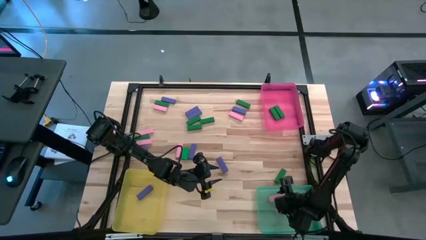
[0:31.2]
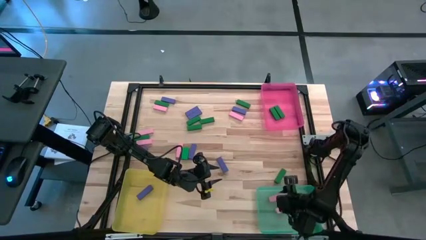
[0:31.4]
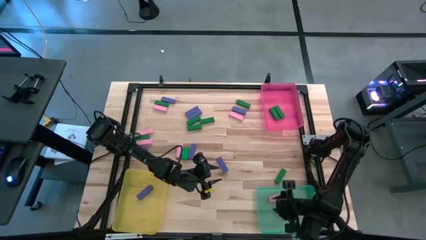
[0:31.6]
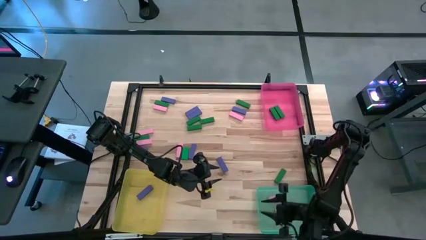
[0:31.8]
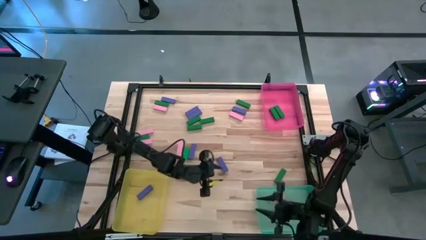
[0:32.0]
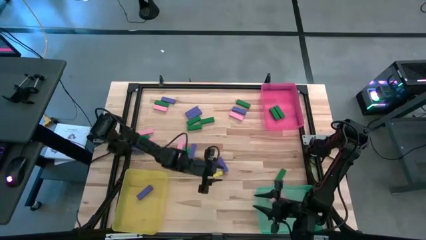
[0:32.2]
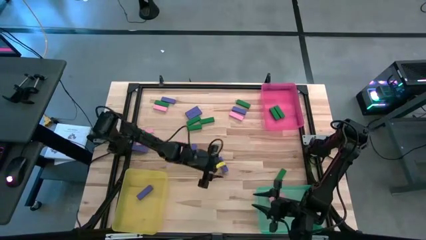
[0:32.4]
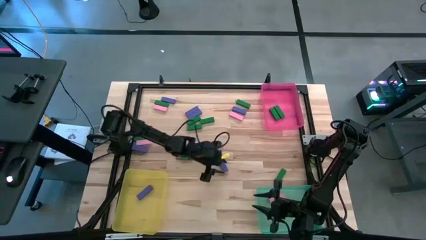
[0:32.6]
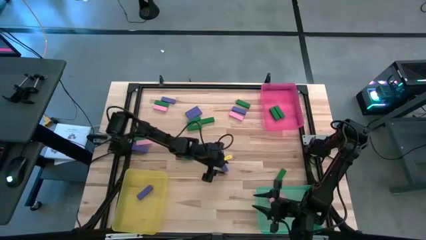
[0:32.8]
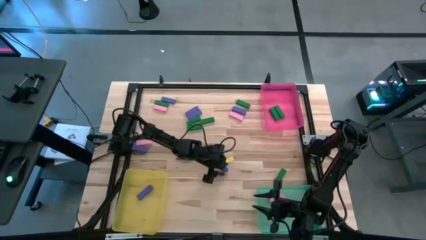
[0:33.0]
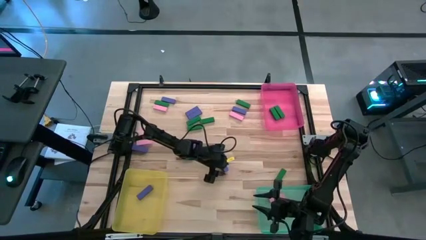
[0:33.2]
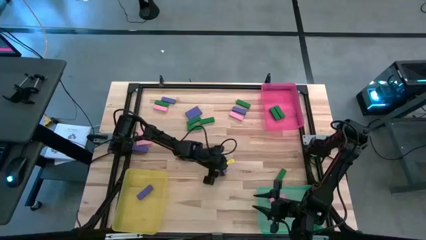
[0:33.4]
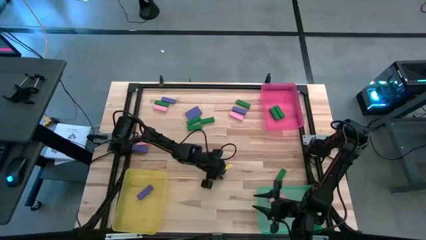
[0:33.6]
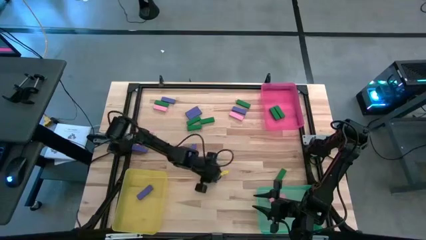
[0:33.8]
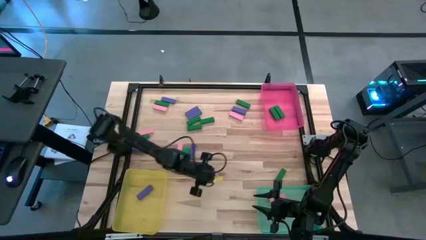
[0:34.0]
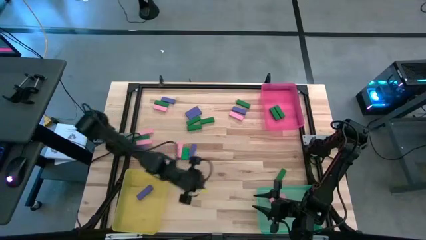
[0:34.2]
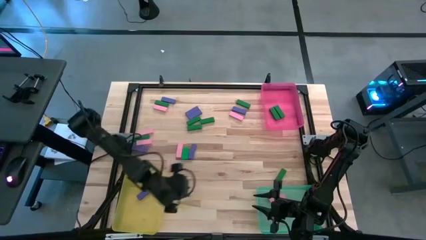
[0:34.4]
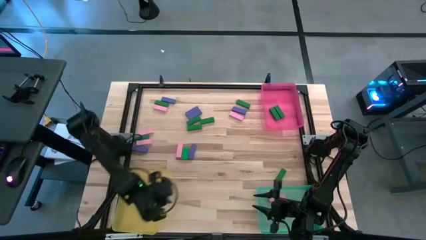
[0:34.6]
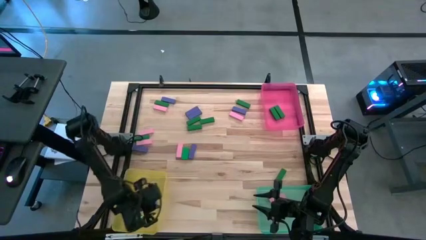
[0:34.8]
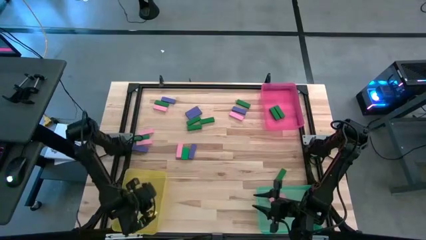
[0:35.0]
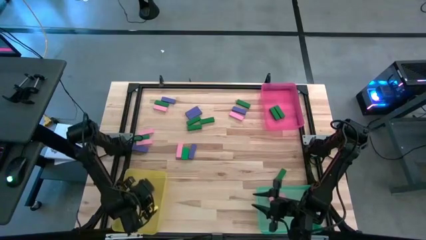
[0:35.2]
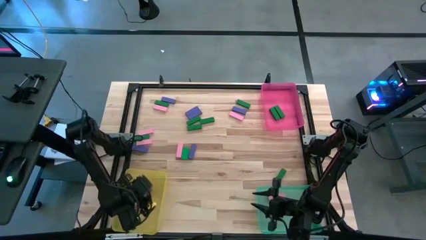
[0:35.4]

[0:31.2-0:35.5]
Task: Sort blocks
Put the blue block into the yellow bin

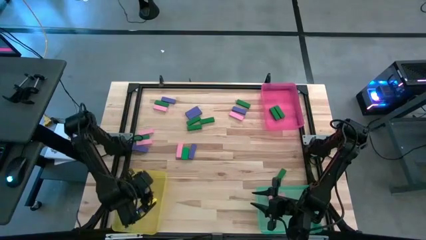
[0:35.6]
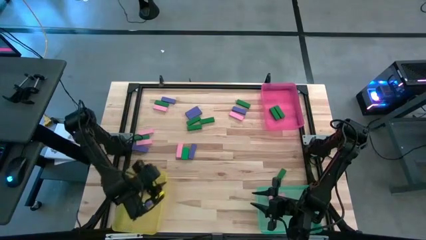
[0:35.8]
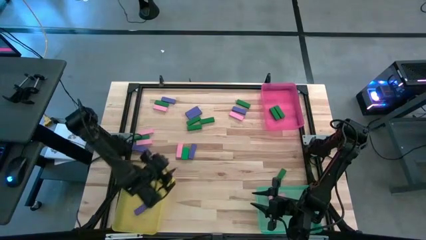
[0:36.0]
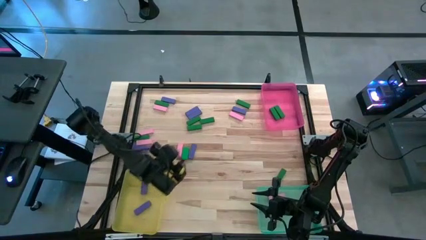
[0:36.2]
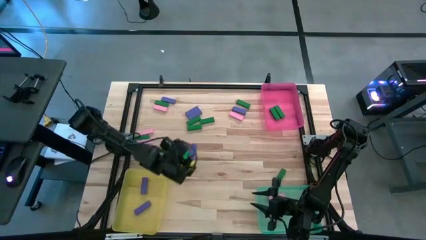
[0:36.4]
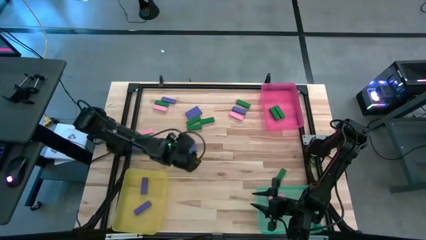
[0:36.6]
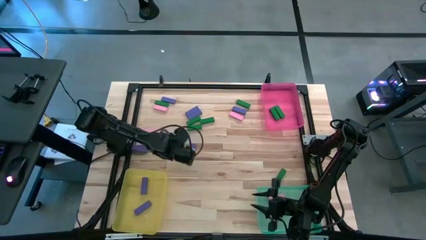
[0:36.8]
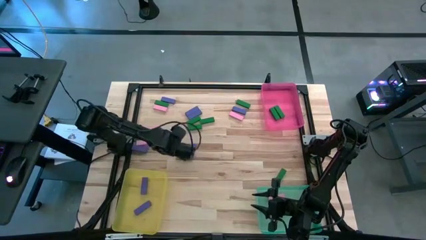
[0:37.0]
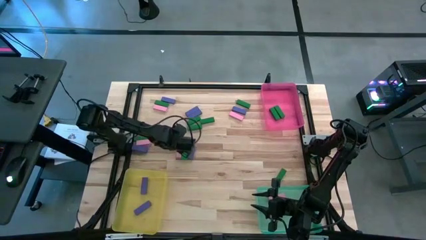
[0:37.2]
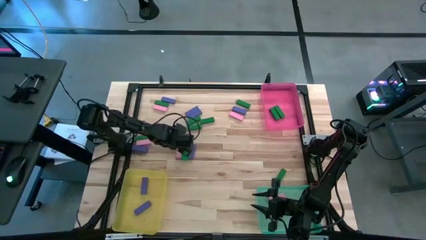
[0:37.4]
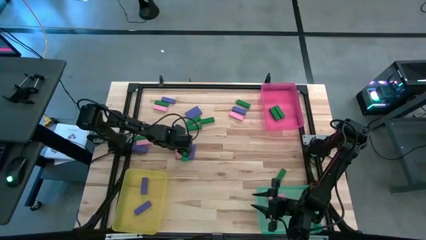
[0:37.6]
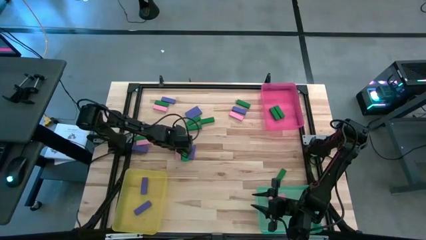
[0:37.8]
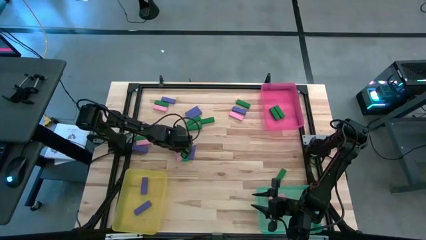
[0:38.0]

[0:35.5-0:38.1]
Put the pink block into the green bin

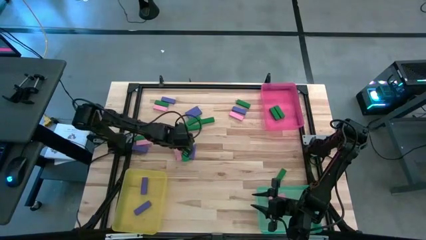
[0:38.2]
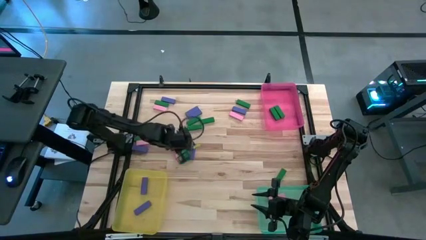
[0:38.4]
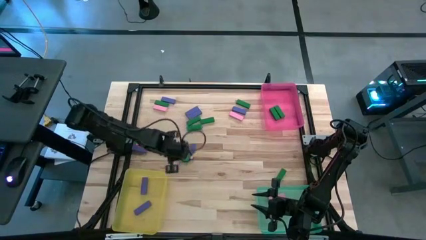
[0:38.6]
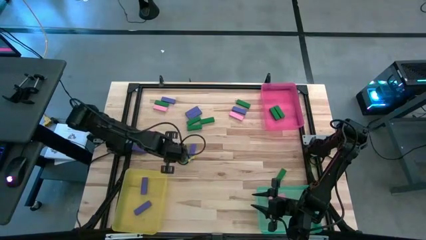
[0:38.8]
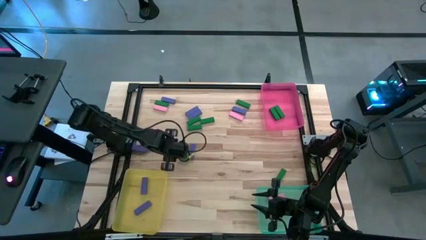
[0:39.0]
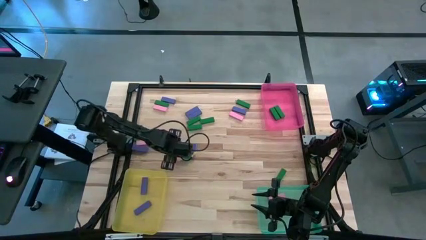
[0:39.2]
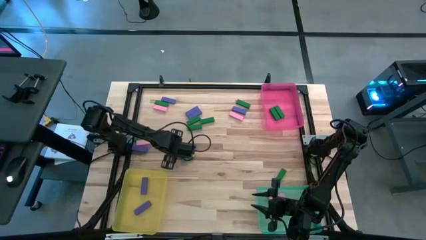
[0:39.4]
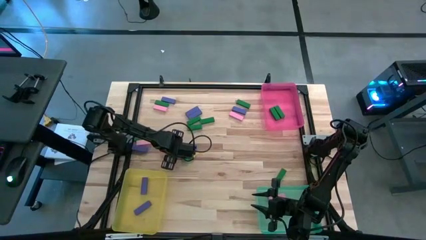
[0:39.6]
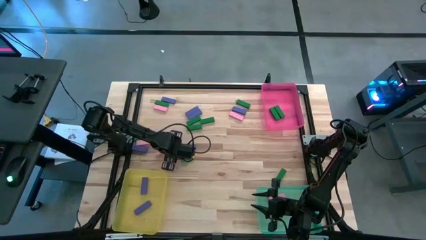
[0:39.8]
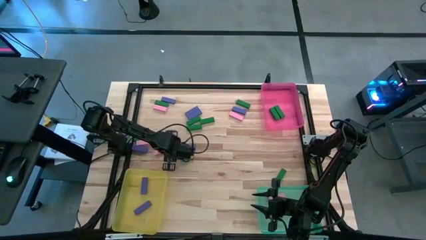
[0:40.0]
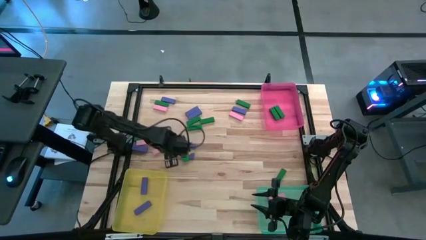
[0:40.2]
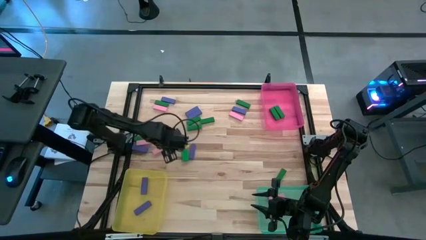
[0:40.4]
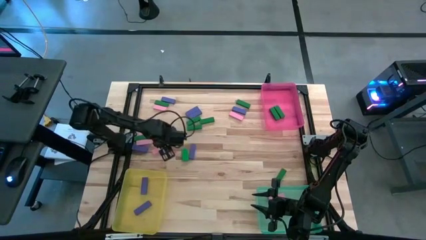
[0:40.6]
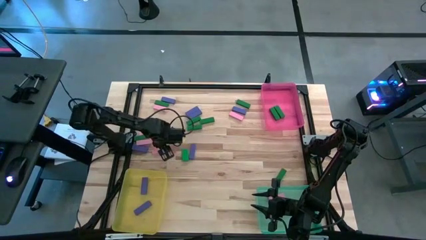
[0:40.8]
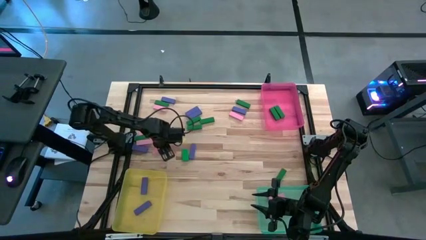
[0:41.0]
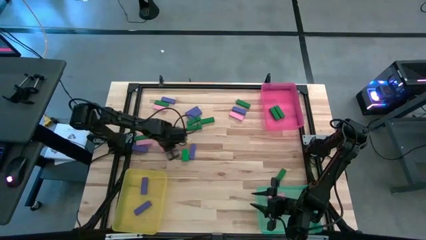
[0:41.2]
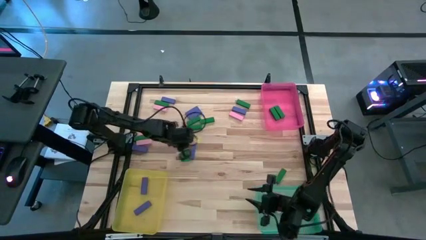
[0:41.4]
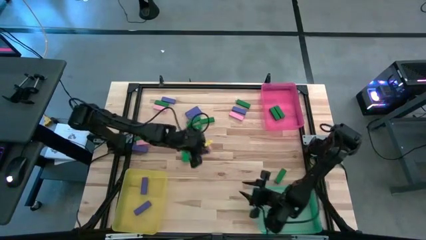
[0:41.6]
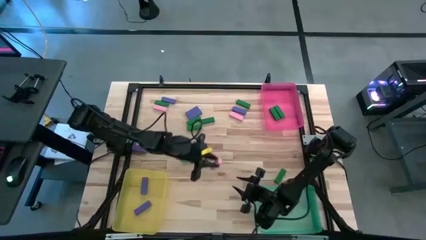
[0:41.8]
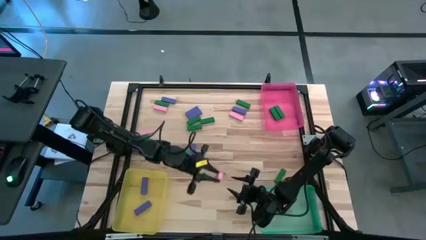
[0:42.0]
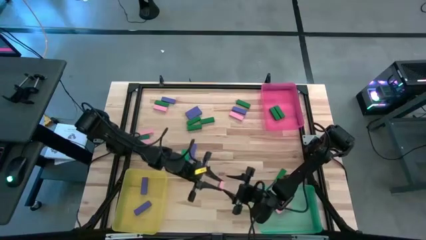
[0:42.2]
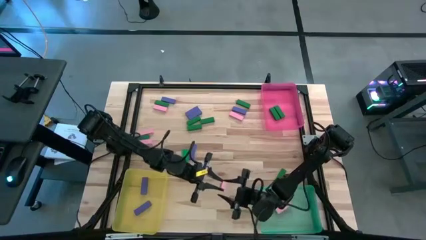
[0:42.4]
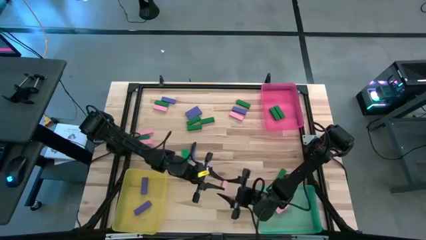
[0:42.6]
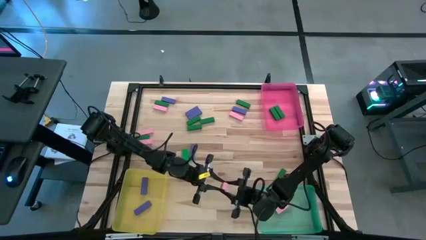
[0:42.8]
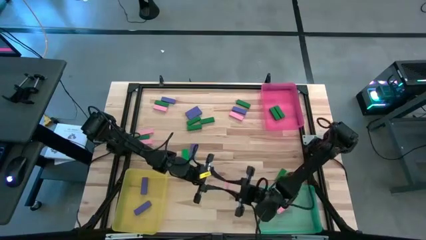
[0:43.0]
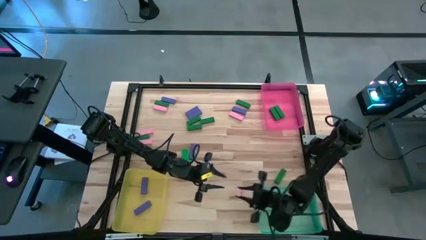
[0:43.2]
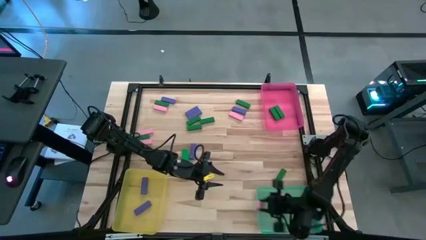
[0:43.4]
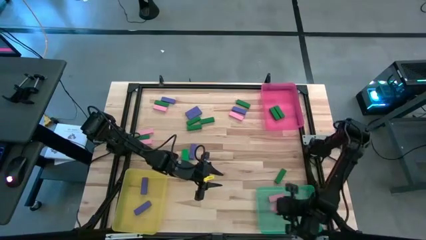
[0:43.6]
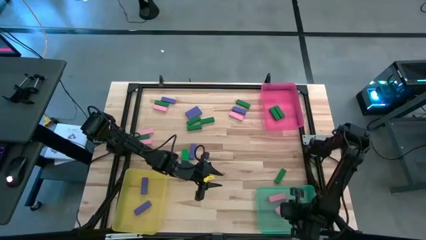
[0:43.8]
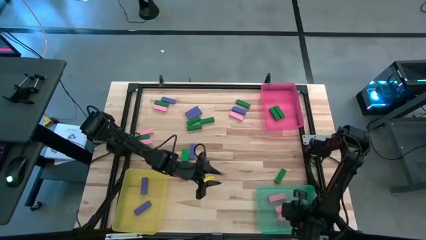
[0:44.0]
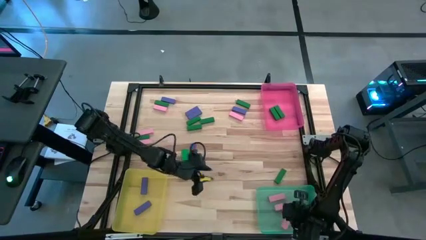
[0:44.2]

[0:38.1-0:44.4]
Put the pink block into the green bin

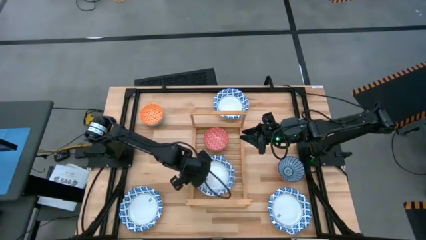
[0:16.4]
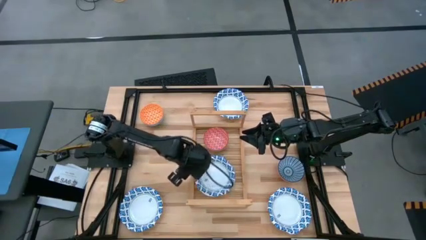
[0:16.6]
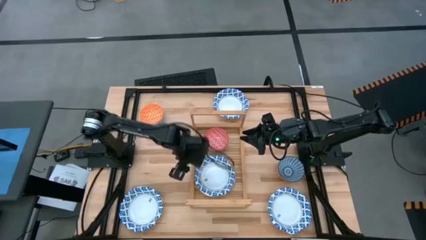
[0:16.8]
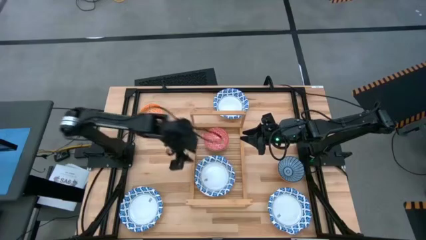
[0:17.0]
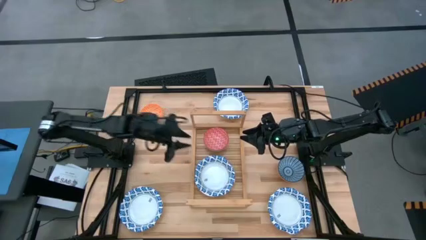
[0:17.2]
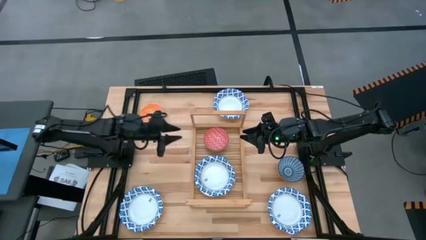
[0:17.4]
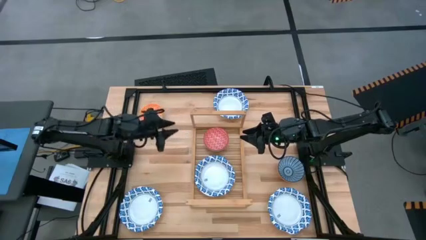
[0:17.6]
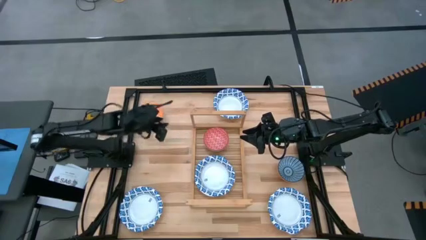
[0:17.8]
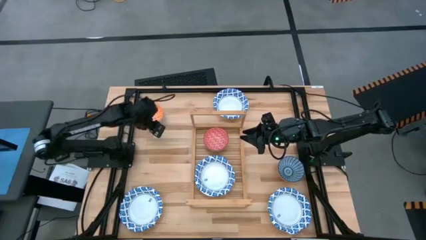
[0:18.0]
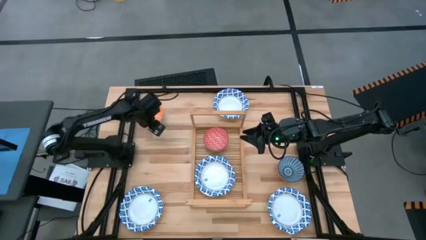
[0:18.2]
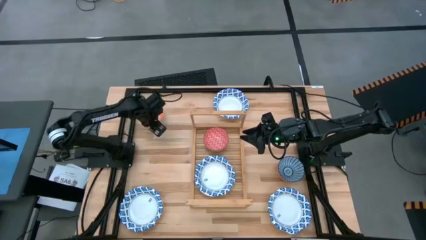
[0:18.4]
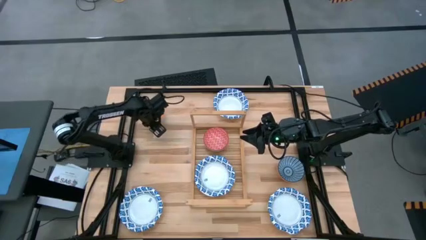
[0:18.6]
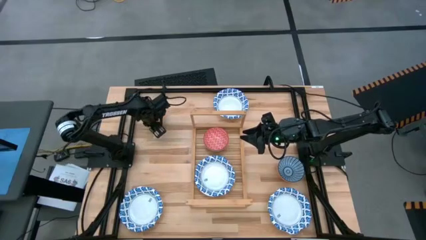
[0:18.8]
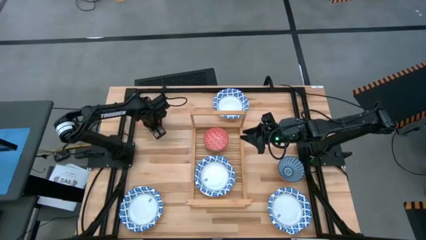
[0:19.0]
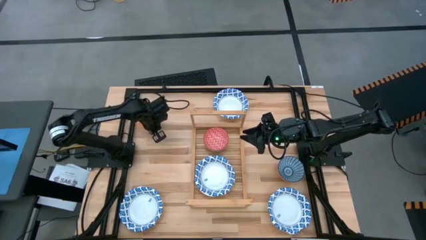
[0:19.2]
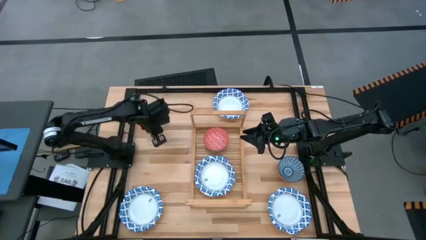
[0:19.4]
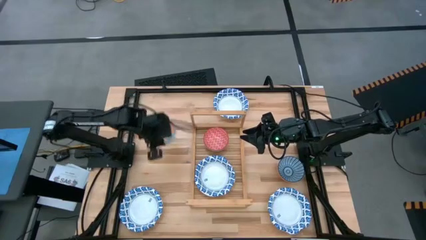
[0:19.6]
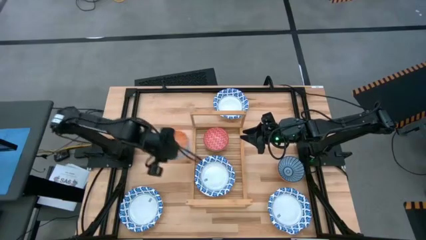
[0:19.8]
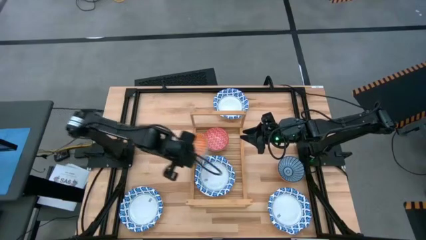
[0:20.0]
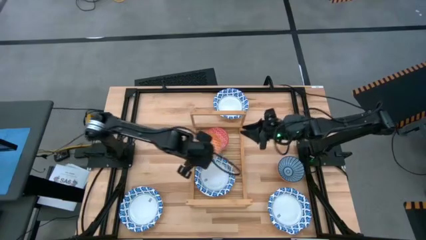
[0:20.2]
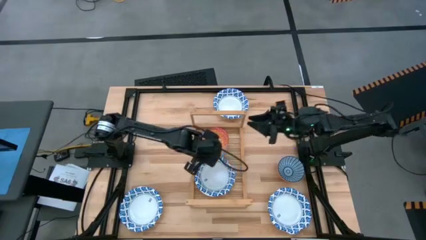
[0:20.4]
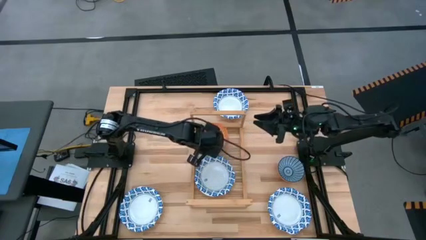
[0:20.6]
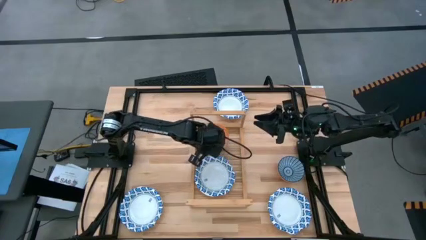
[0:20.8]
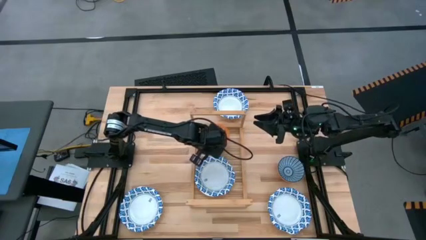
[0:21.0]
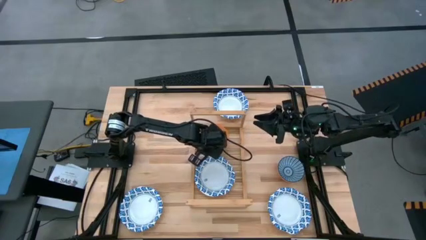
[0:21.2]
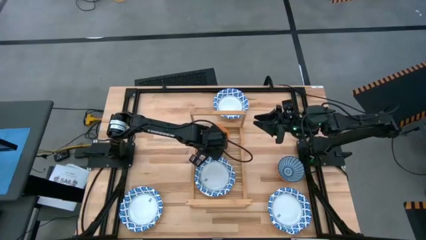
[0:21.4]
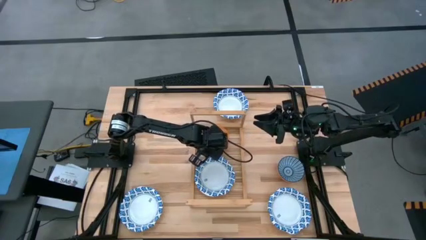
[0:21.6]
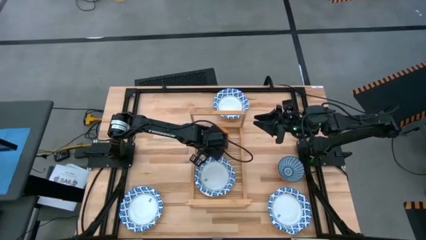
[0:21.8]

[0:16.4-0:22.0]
Task: Place and stack bowls onto a shelf
Stack the orange patterned bowl into the red patterned bowl on the shelf
